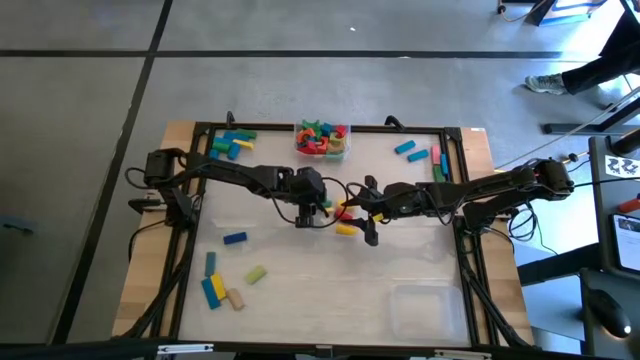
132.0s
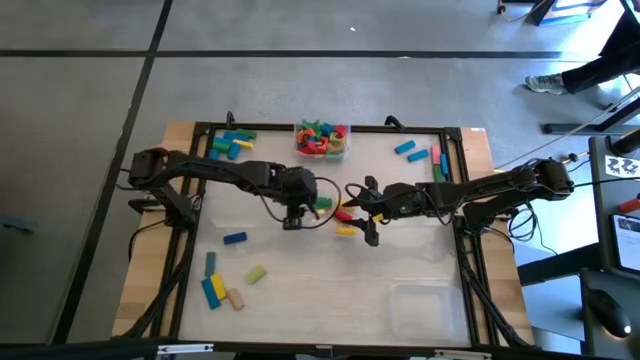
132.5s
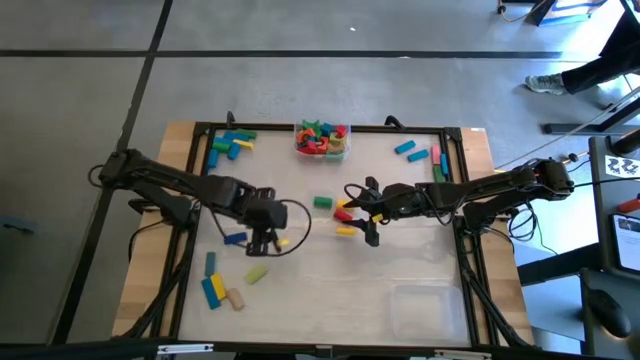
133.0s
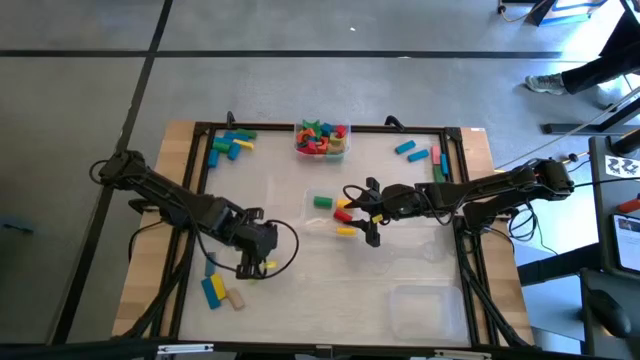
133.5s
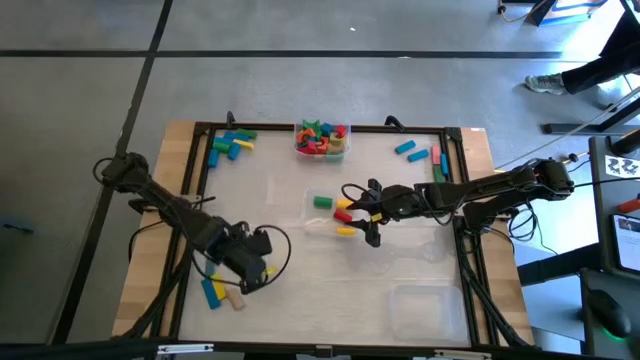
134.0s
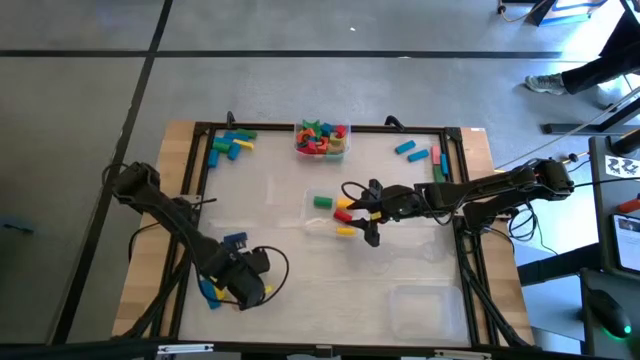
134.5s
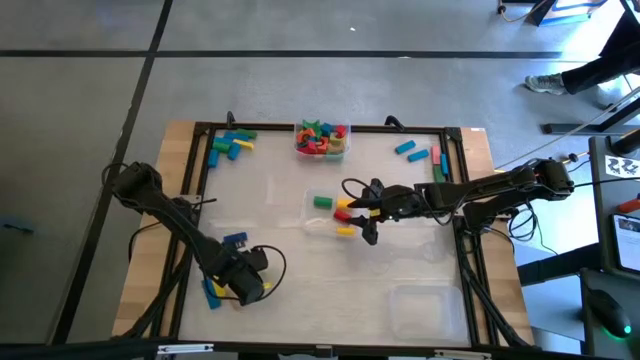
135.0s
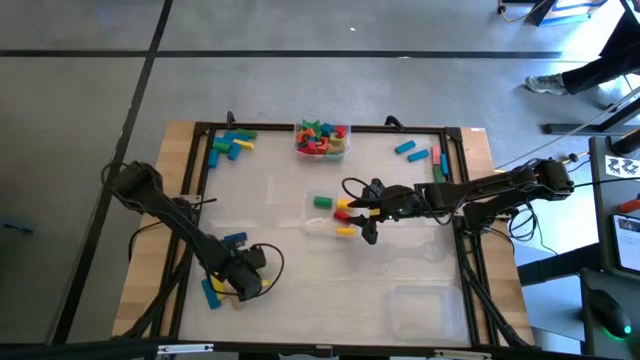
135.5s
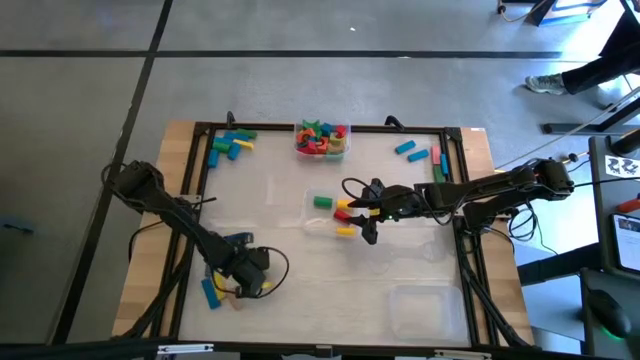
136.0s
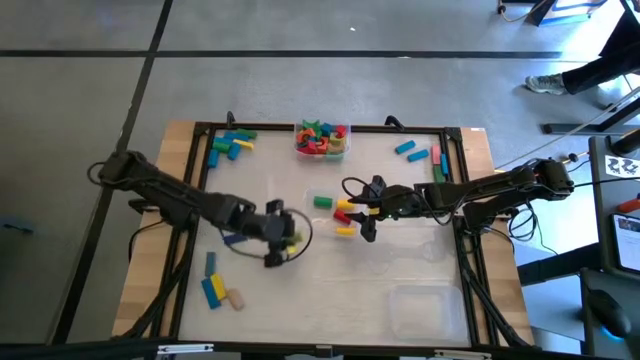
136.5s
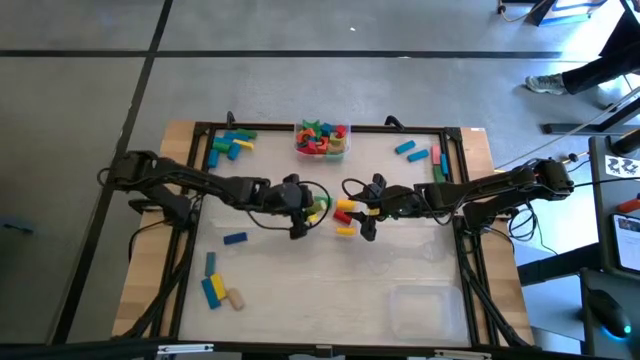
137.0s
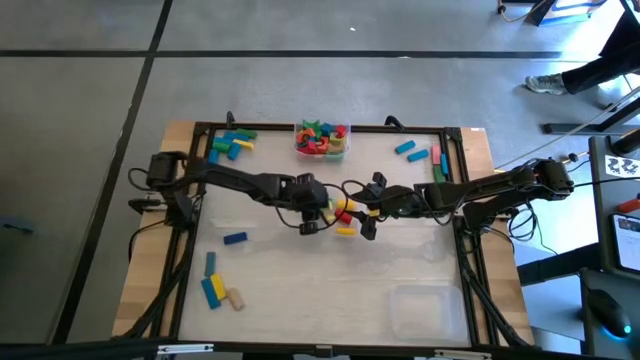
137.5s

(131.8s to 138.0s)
Task: Sort blocks by size
Put the light green cylindrical block into the center transparent bin

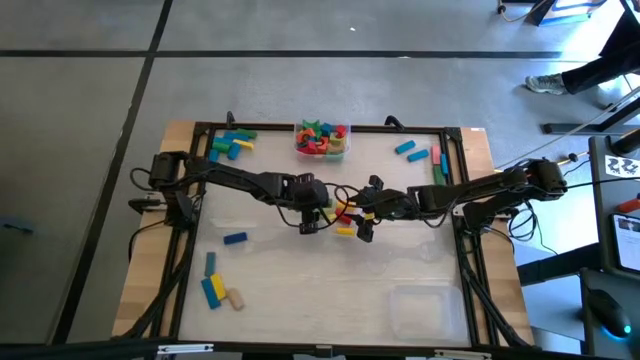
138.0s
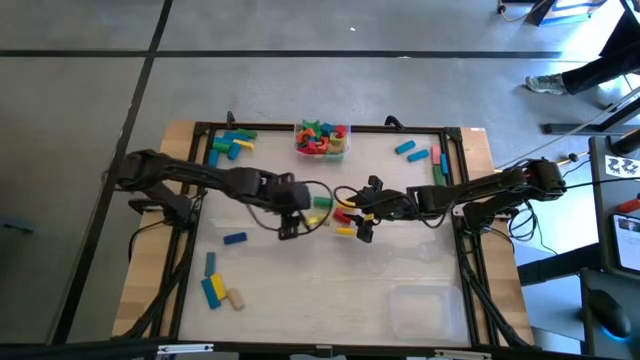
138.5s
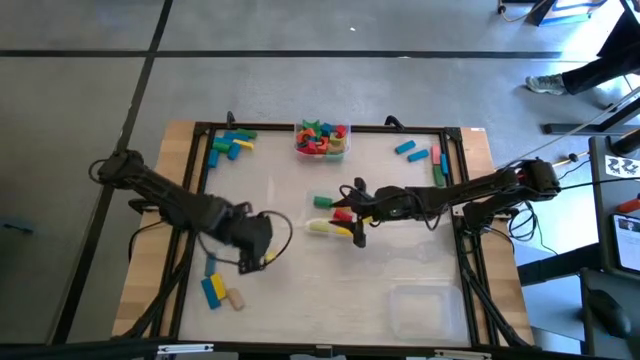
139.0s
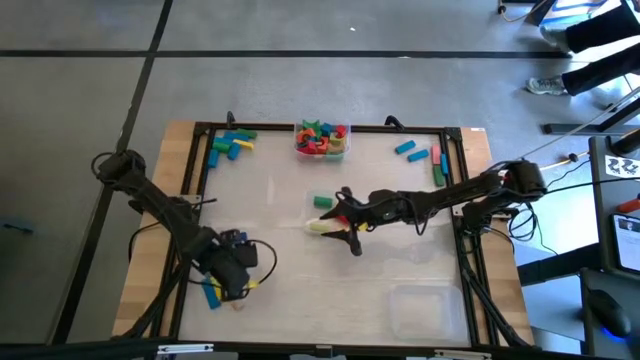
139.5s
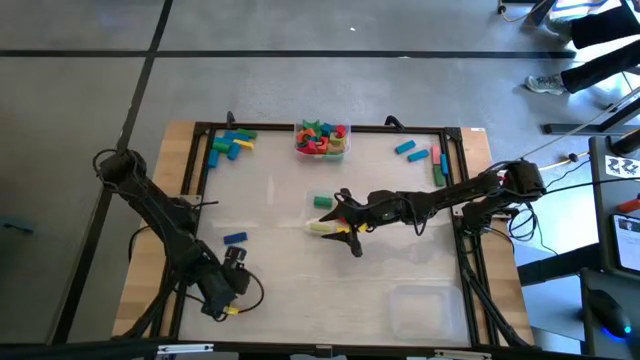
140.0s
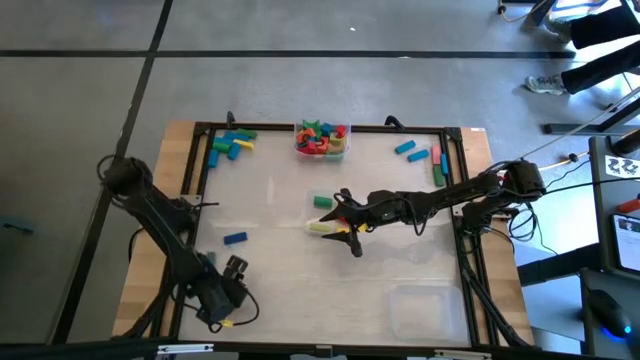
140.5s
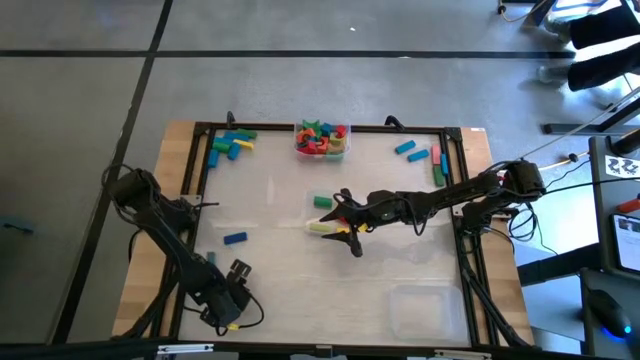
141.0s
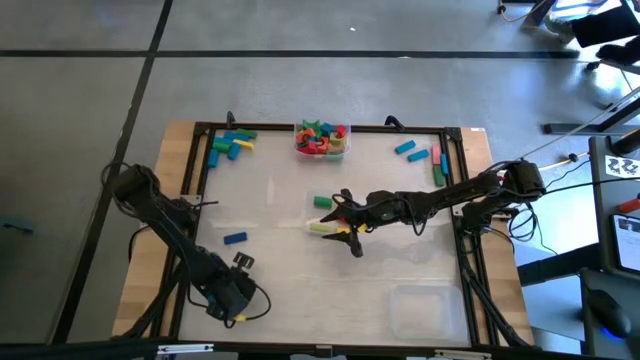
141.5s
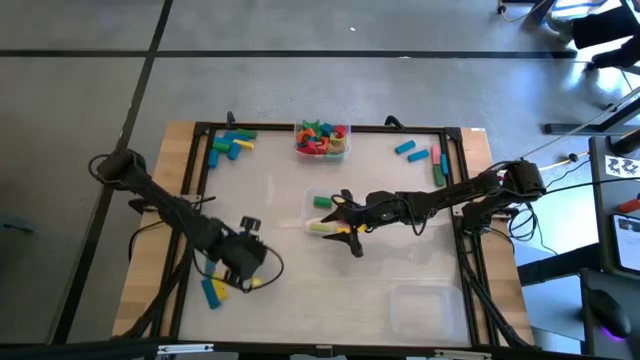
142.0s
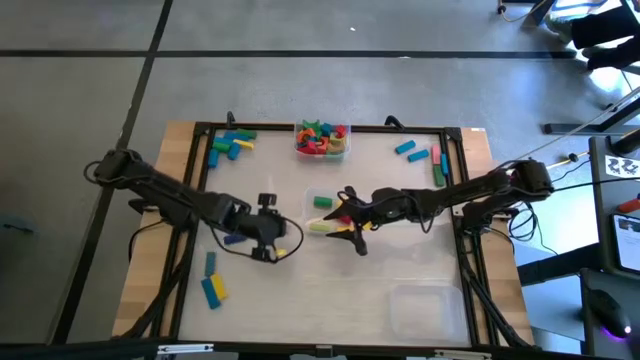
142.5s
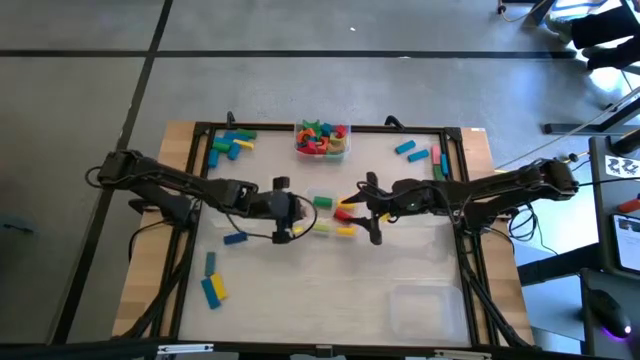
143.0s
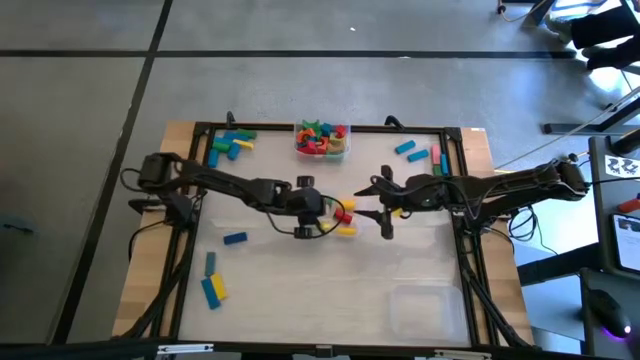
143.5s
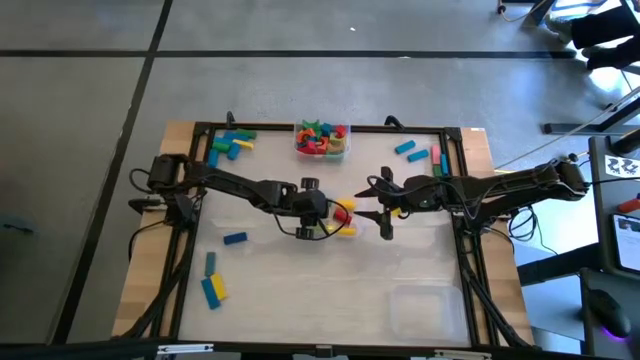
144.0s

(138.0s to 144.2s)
Put the brown cylindrical block into the center transparent bin

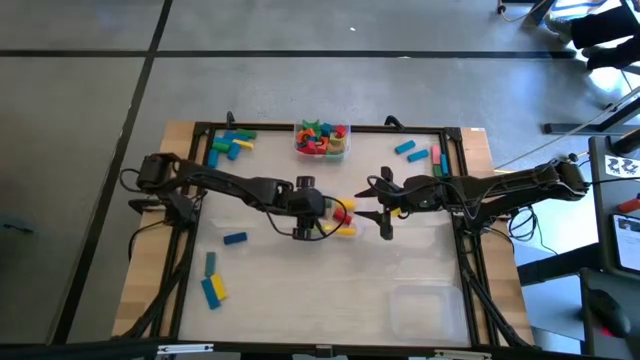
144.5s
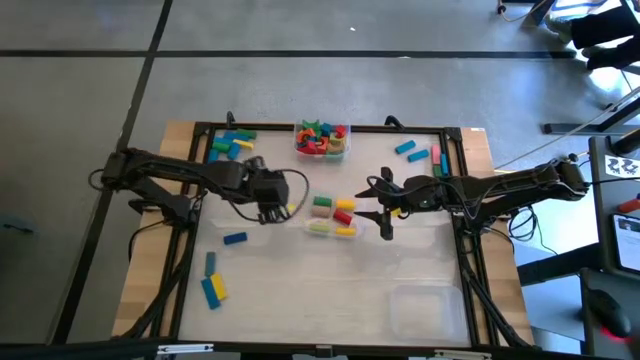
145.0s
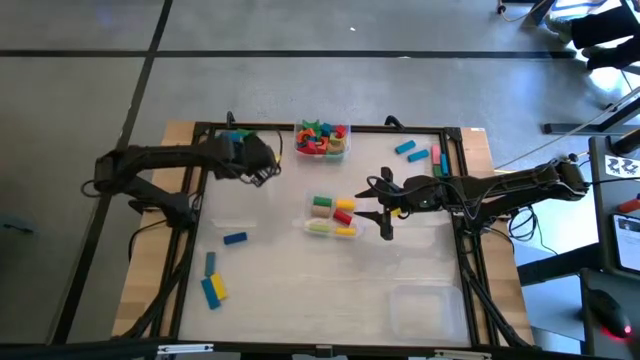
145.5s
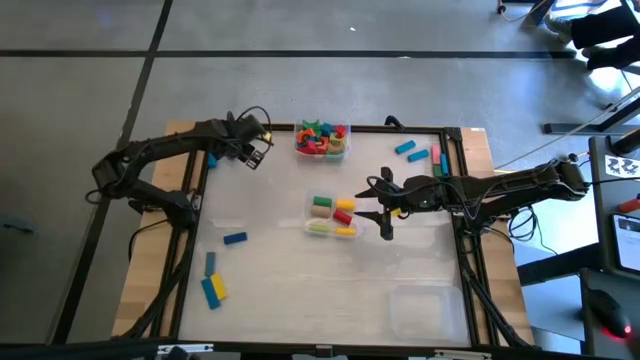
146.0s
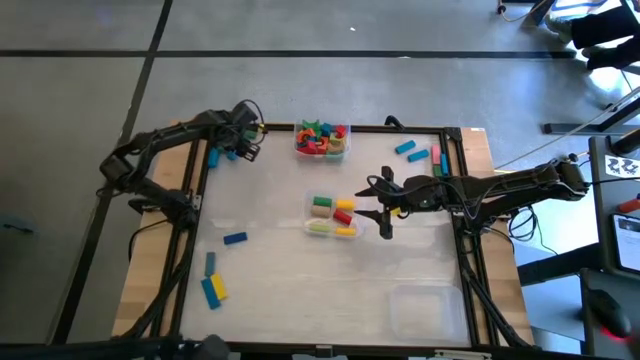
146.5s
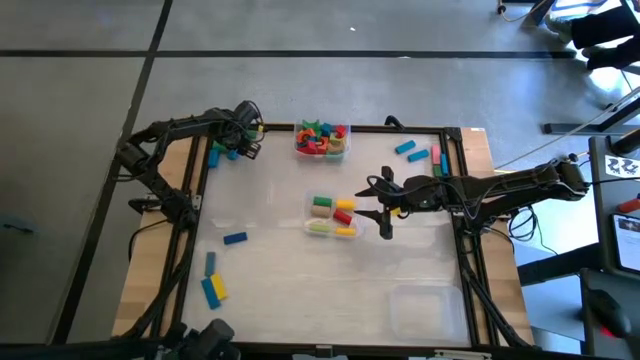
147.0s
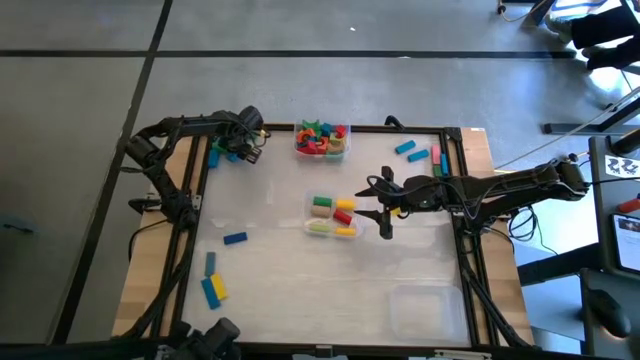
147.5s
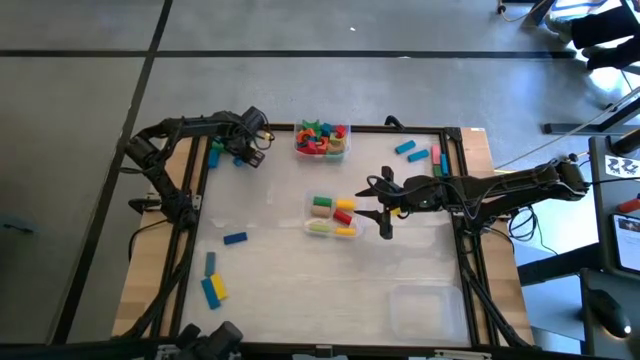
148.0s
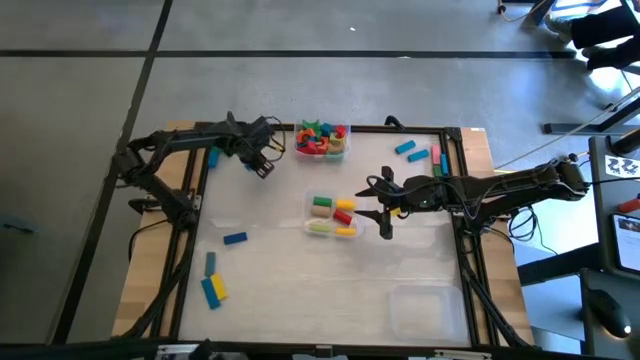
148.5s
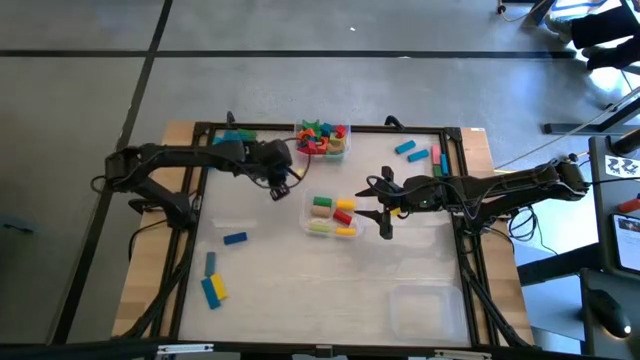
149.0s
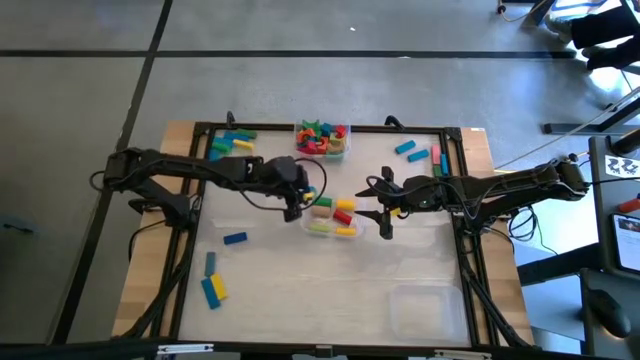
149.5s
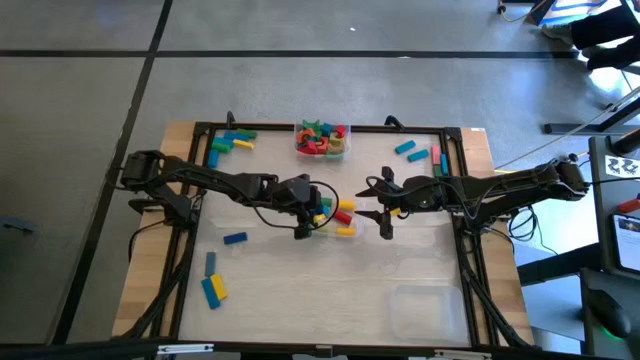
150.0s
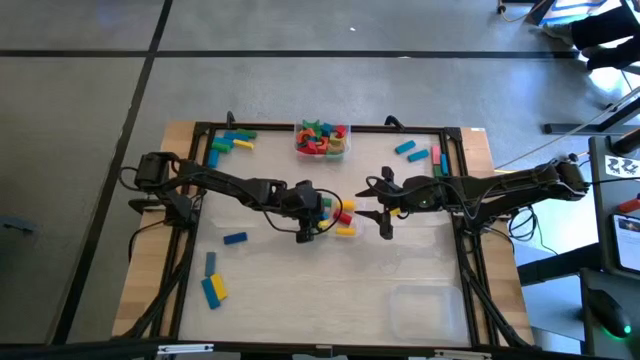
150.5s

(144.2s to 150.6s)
Put the blue cylindrical block into the center transparent bin

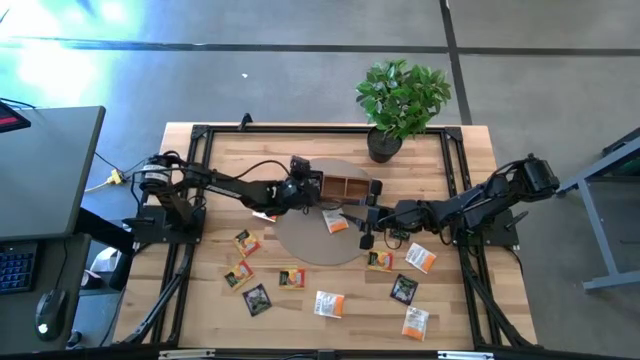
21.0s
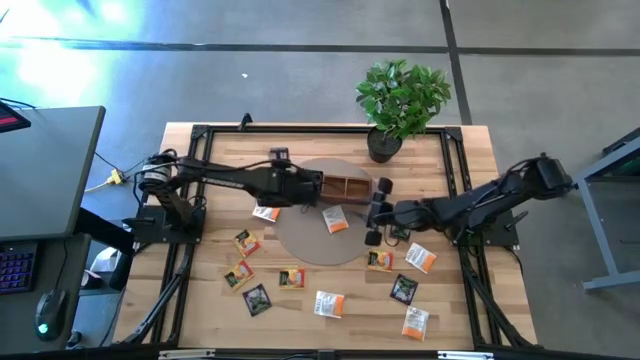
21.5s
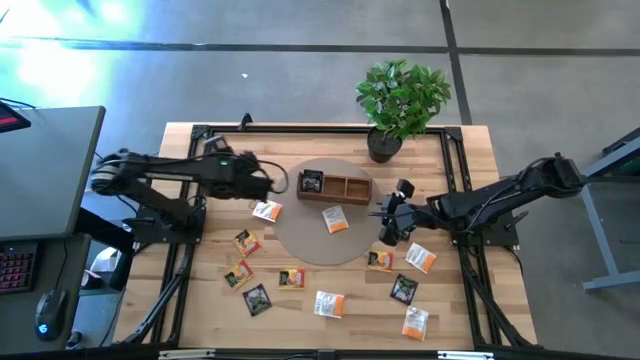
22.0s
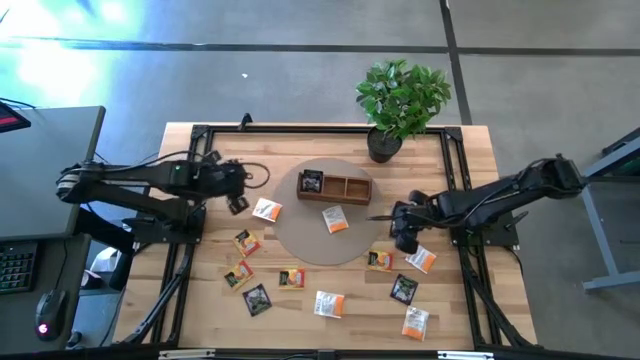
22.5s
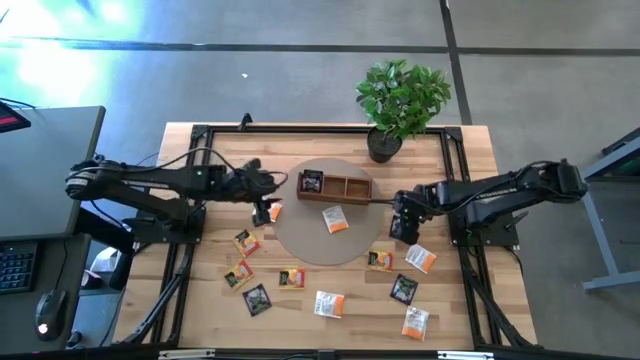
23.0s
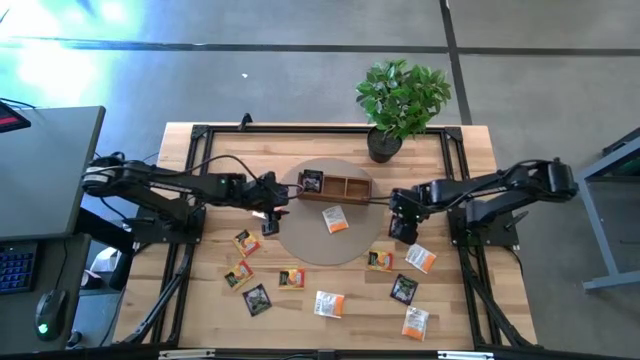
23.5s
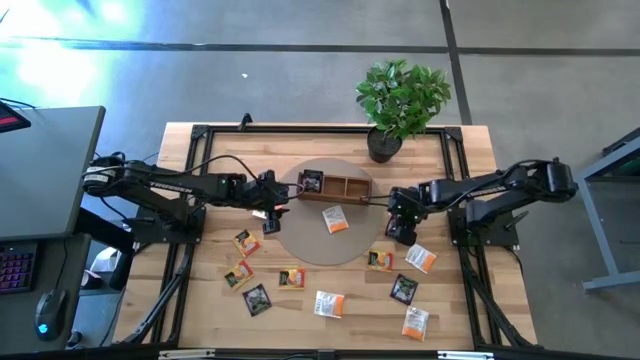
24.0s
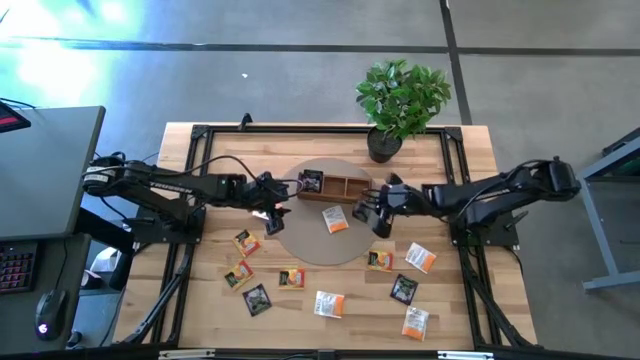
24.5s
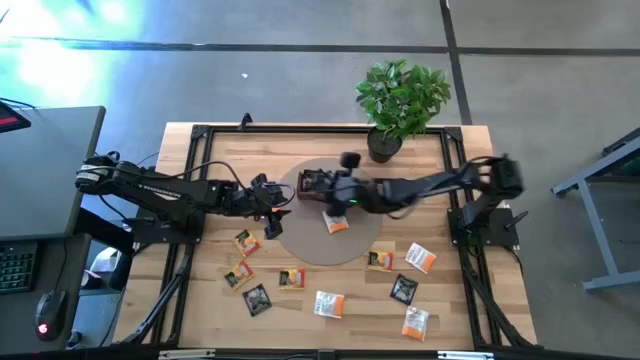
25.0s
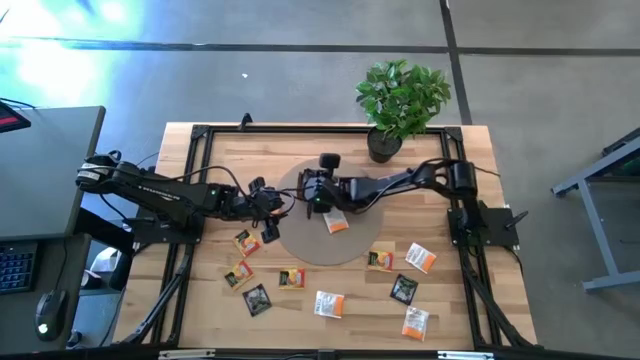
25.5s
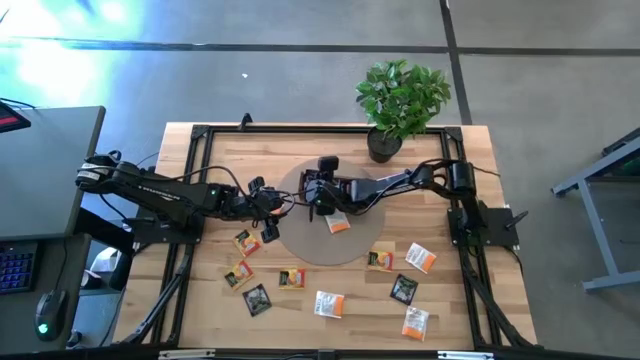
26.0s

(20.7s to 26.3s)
Task: Pick & Place Tea
Put the black tea bag into the left side area of the wooden organizer
